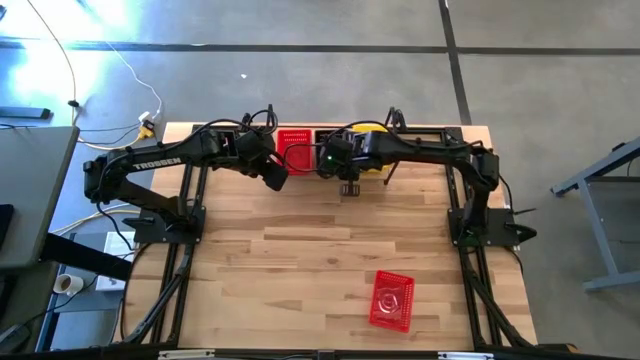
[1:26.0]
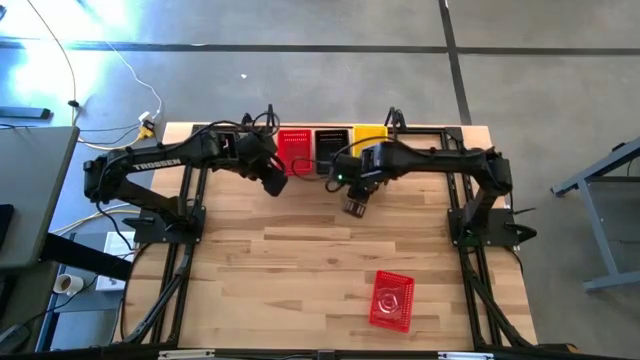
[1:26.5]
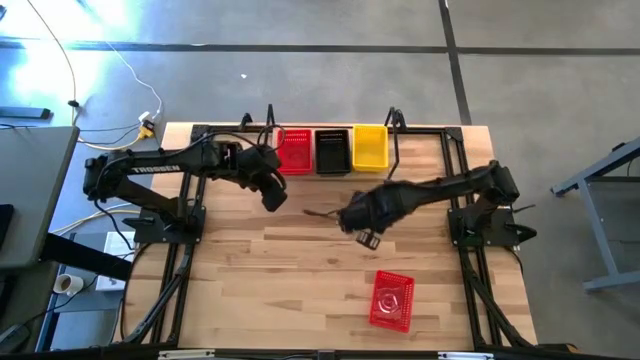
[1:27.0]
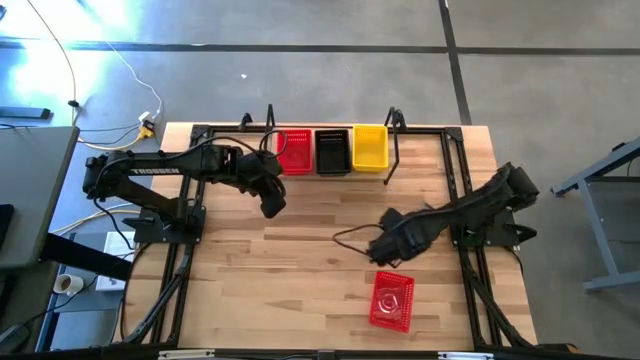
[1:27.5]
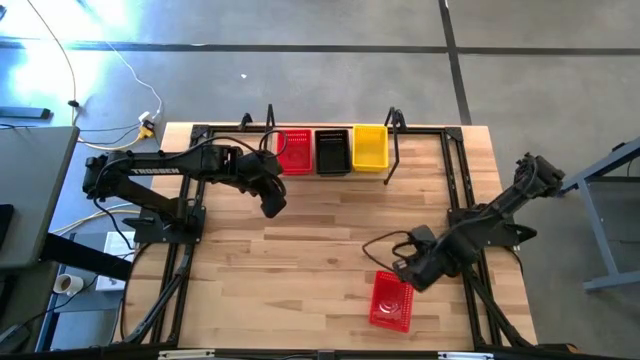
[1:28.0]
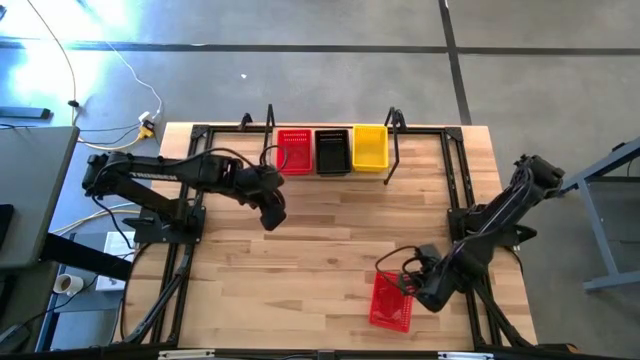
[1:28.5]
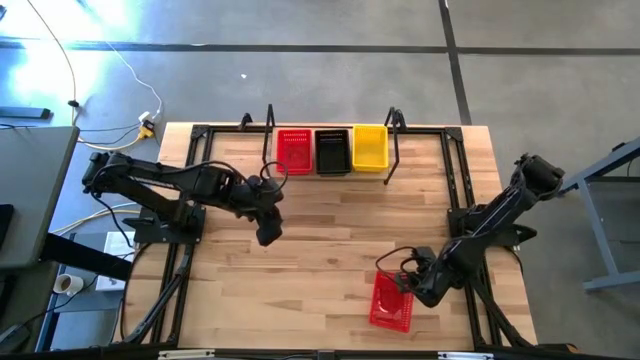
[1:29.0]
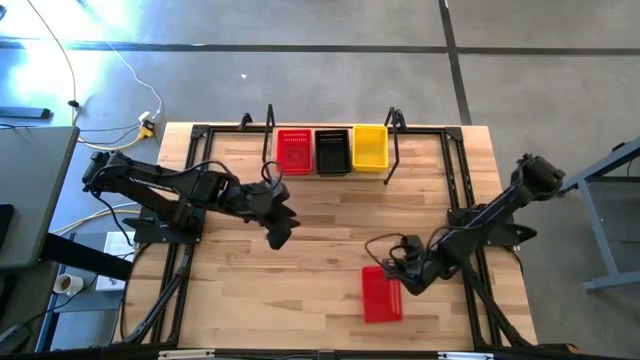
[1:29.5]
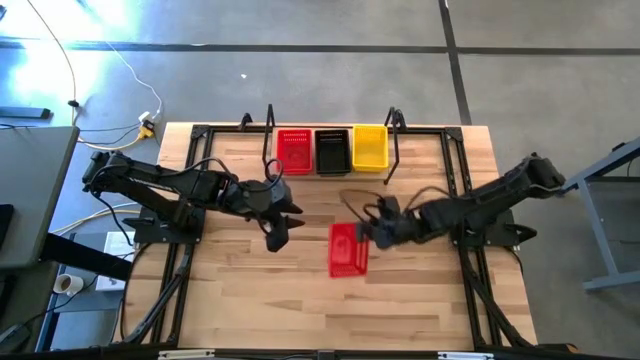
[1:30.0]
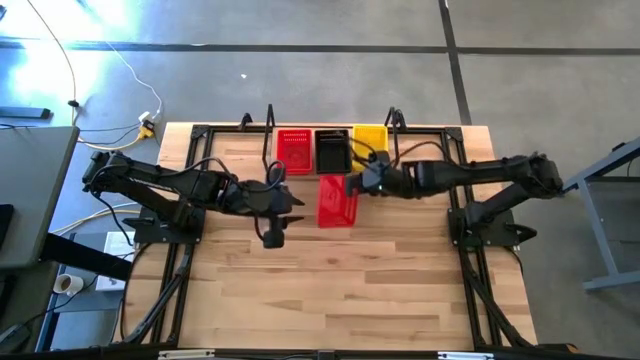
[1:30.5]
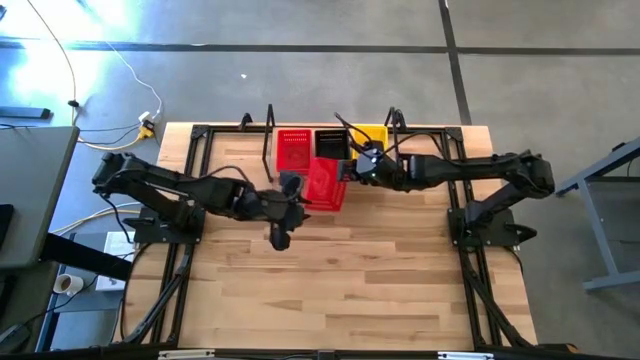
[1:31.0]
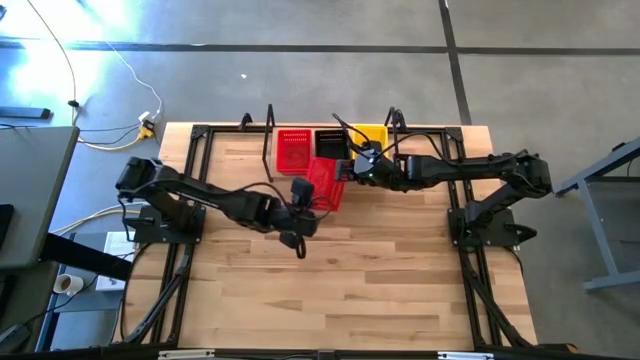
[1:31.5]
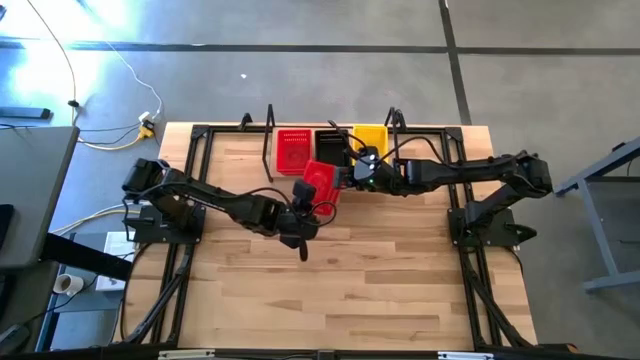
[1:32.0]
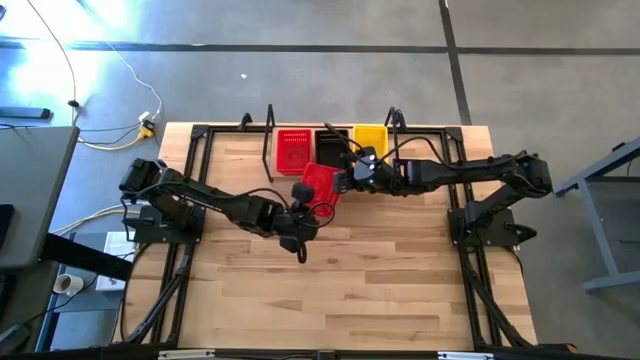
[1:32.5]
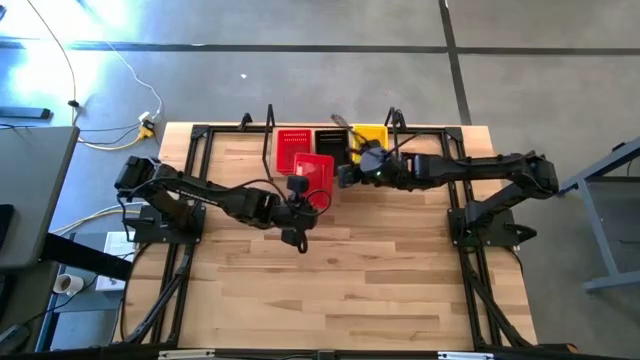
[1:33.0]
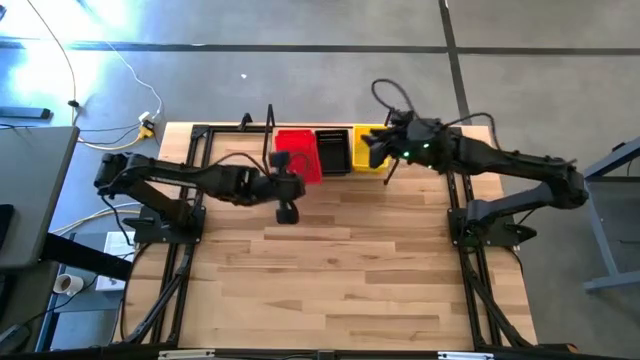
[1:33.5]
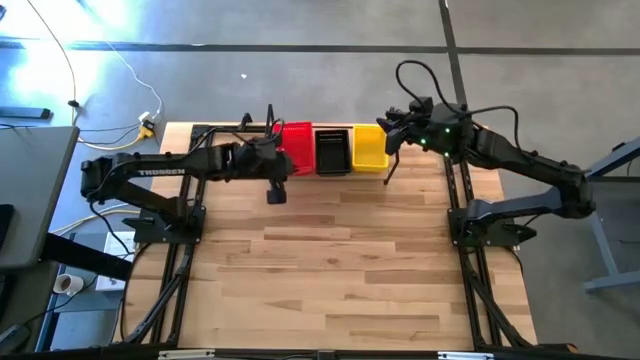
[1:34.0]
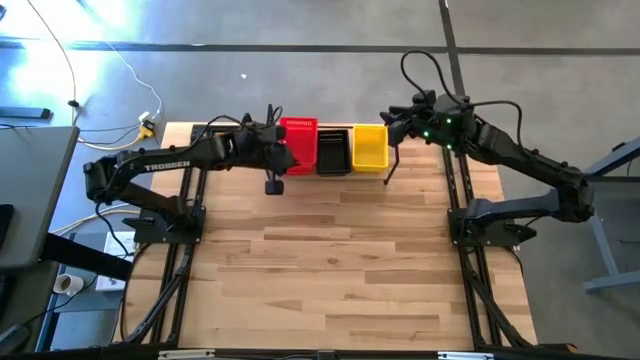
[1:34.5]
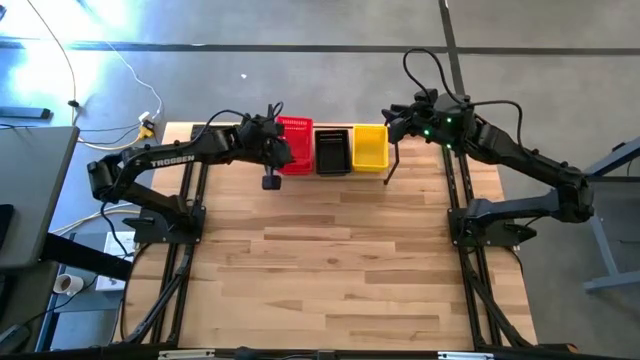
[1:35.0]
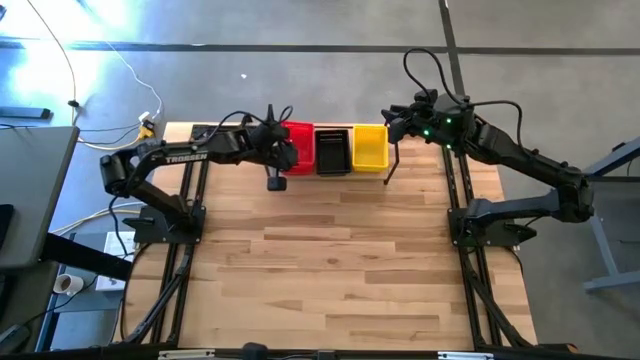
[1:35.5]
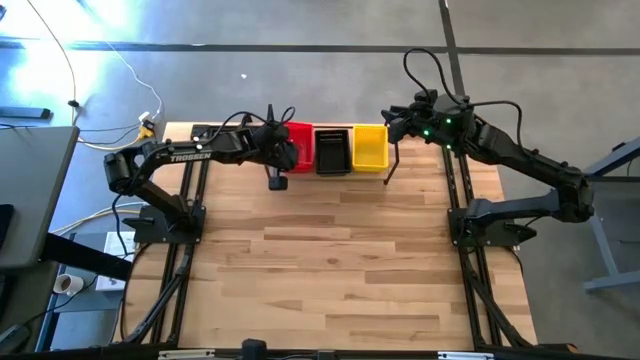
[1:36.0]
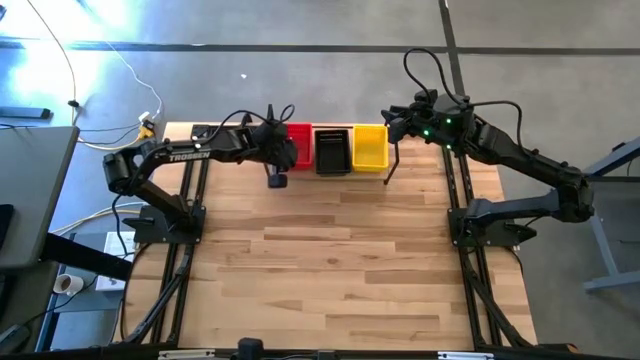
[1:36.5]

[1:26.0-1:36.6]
Task: Stack baskets on shelf by color
Stack the red bin on the red bins on the shelf

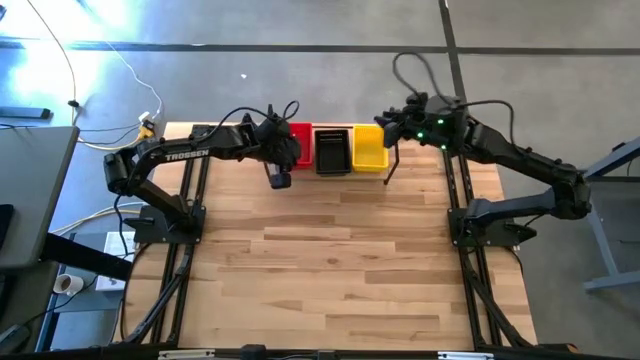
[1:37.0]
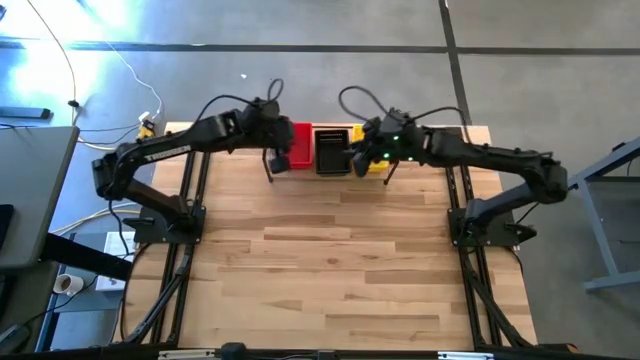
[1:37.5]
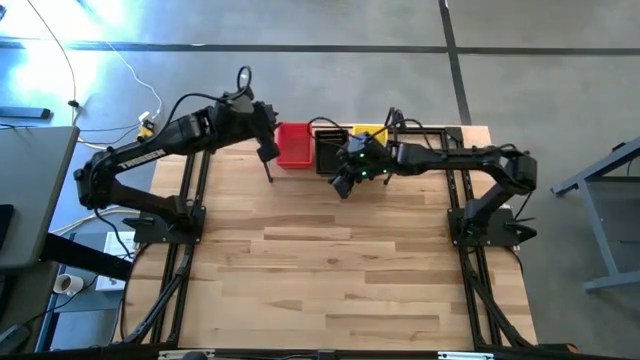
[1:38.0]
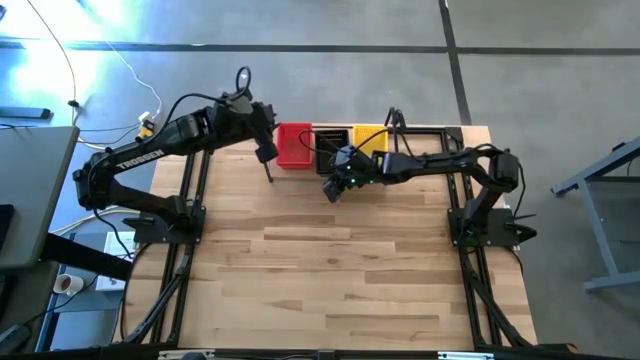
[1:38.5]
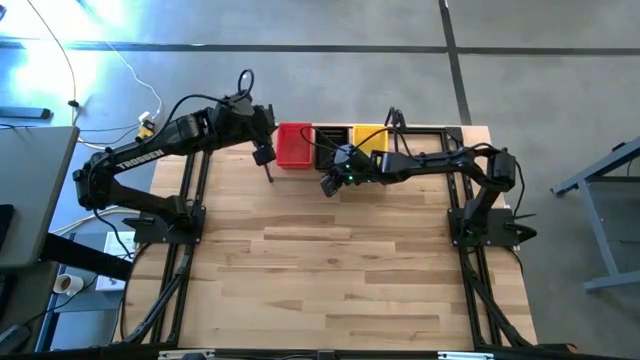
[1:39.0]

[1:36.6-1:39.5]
Adjust the stacked black bin on the shelf

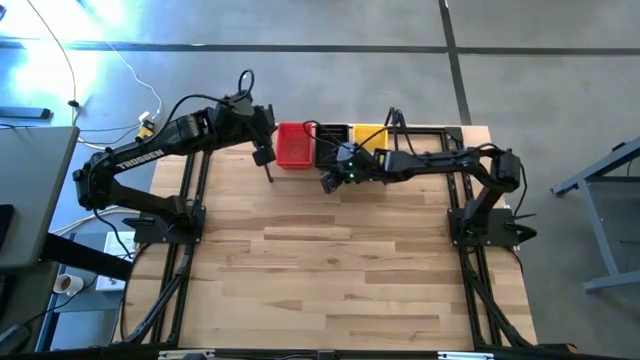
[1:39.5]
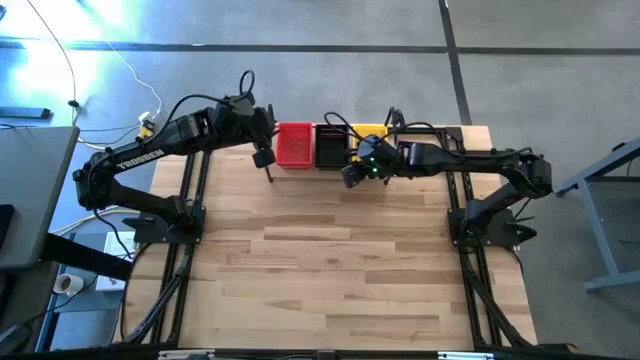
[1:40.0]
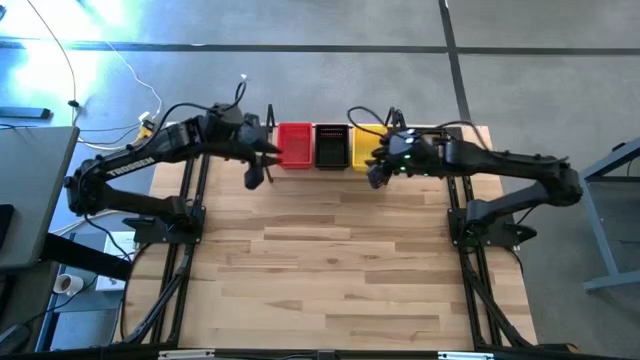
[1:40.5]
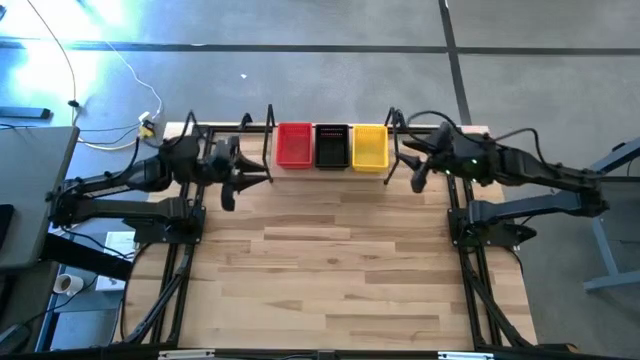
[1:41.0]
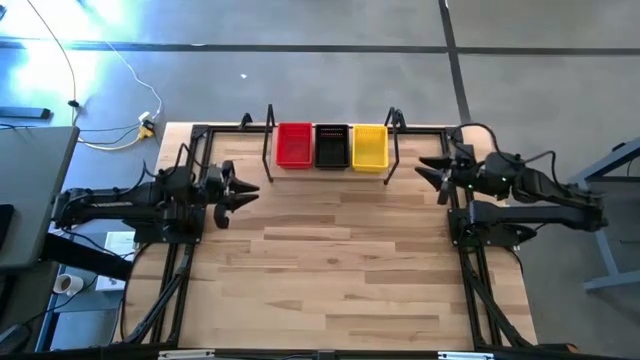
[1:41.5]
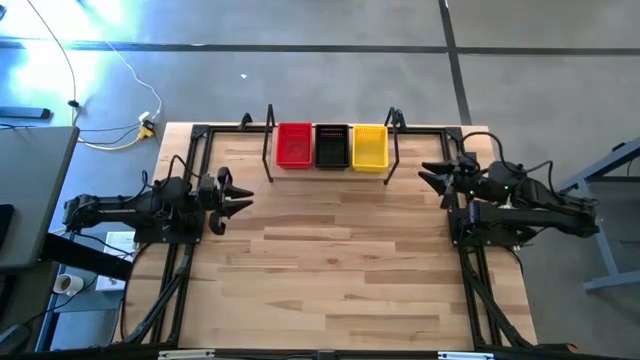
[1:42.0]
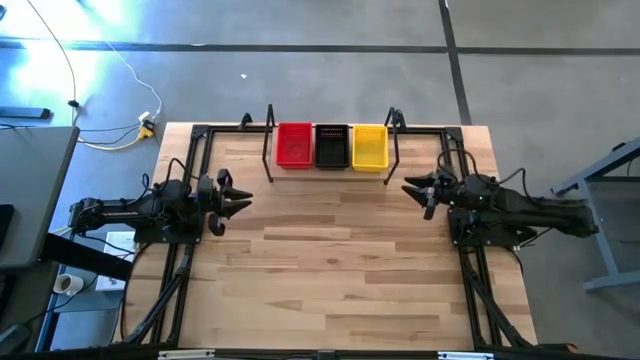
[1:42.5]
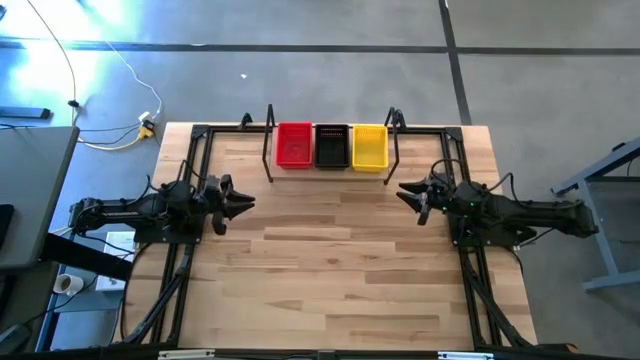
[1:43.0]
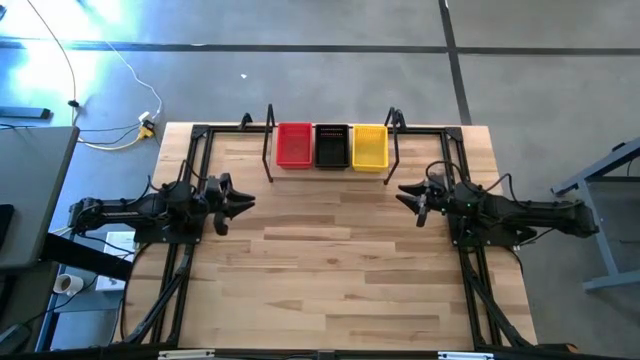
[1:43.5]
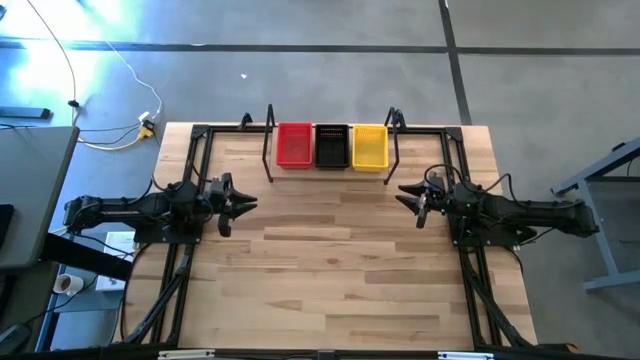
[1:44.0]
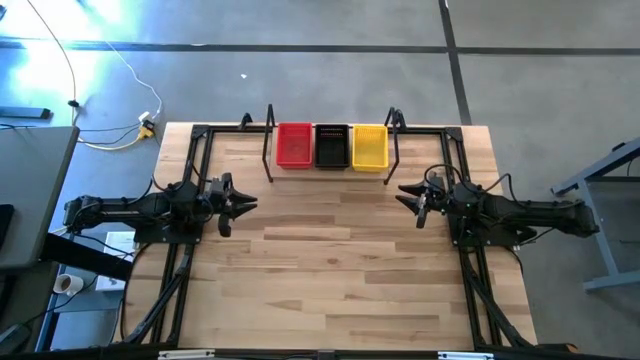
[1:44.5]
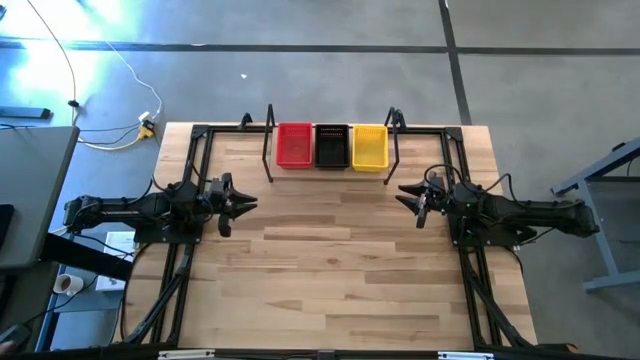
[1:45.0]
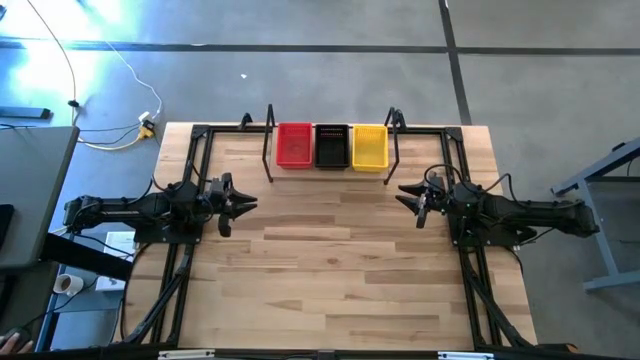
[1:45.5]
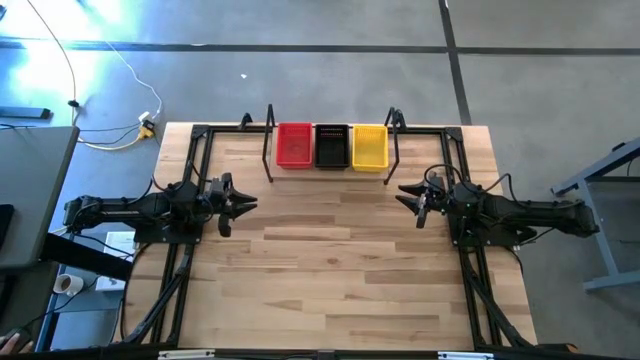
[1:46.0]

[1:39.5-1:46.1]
Return to Home Position
